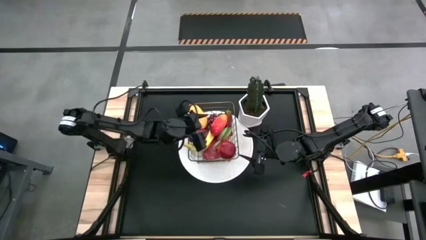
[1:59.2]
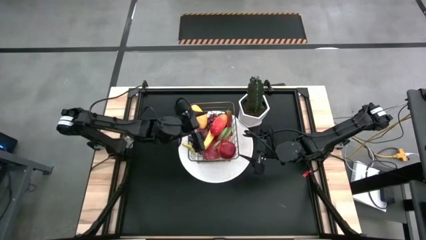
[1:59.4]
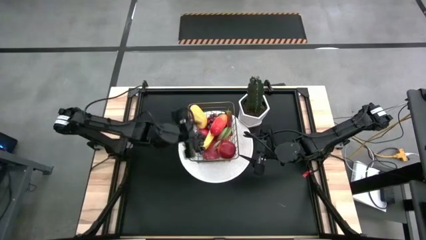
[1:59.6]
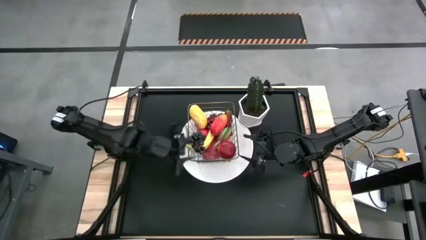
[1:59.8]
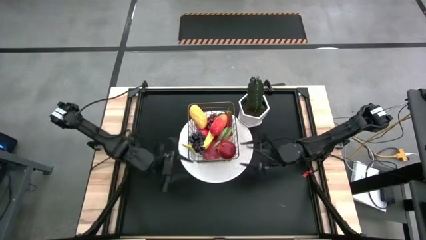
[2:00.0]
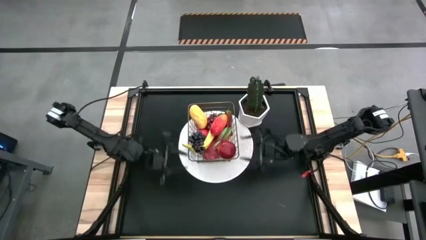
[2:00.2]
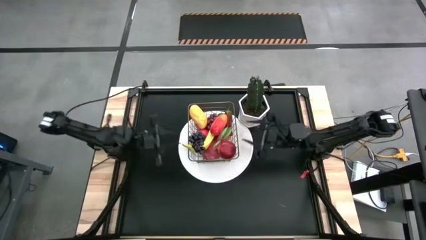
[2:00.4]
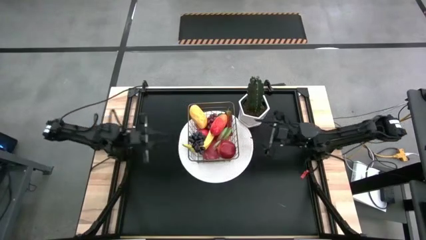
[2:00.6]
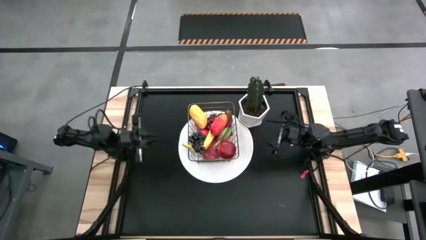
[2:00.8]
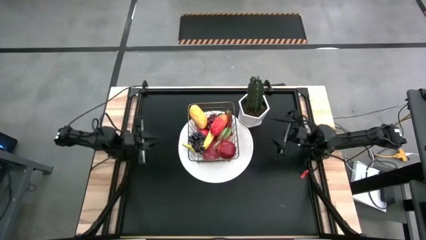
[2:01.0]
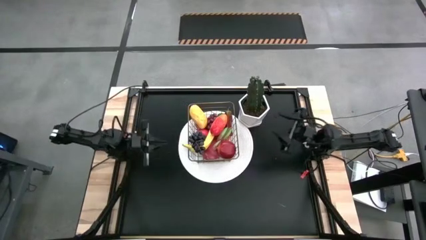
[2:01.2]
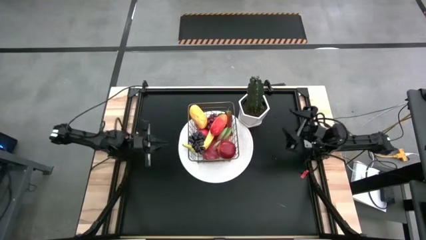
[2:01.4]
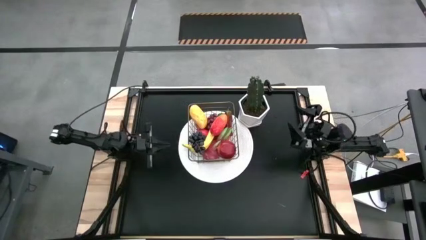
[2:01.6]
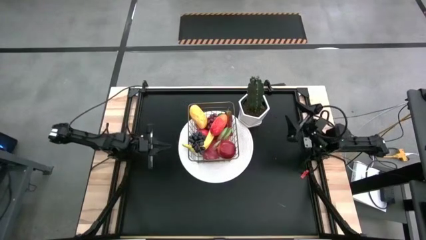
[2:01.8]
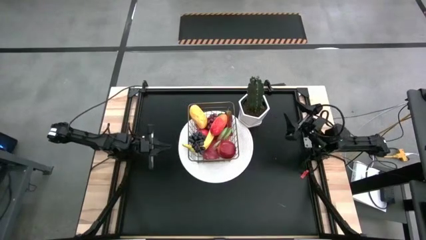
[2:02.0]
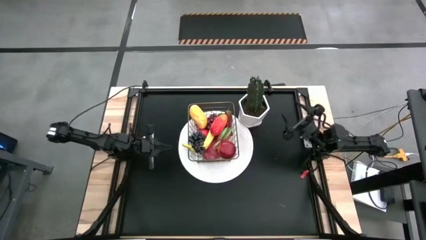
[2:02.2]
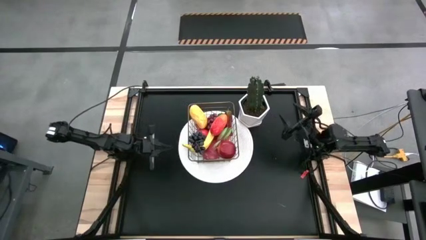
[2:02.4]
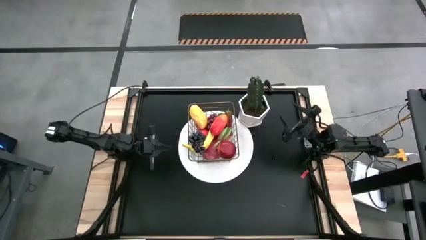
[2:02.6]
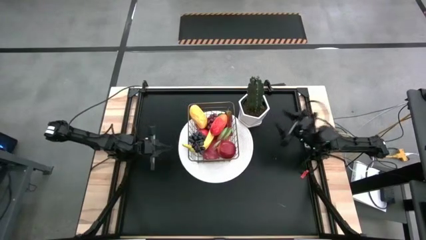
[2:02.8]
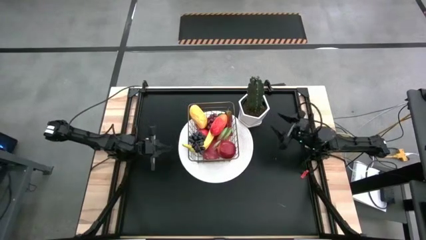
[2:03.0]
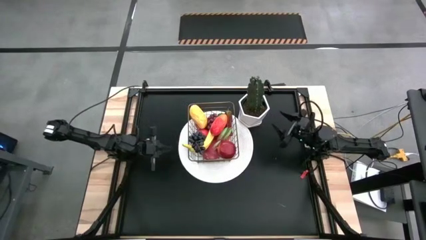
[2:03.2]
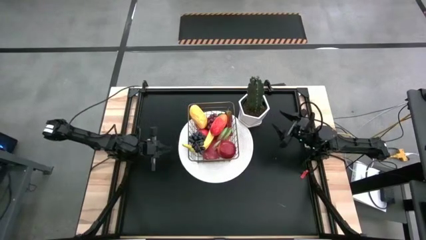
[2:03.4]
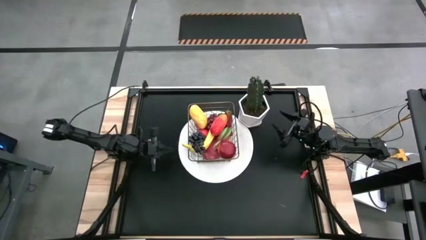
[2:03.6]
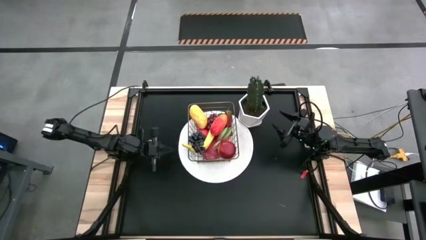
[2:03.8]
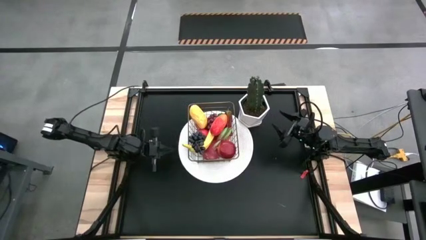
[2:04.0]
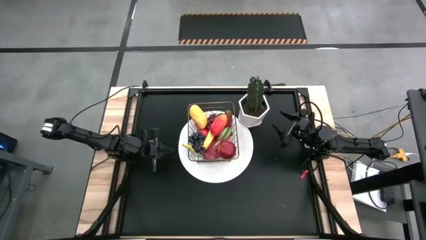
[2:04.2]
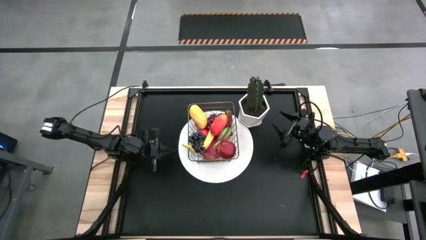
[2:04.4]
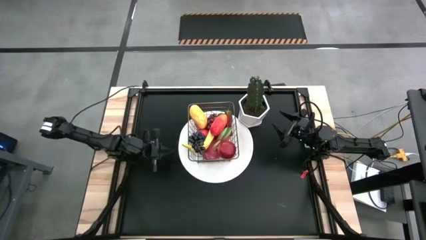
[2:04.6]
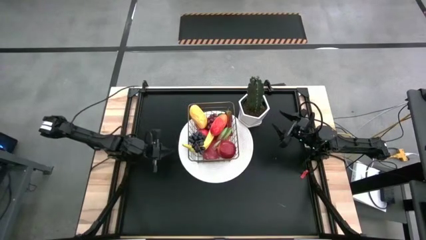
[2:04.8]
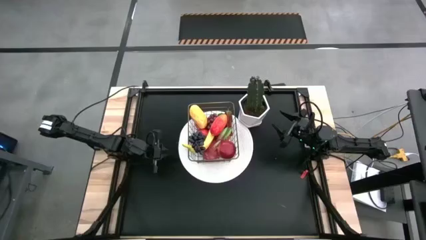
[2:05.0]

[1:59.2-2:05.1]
Task: Build produce basket
Return to Home Position

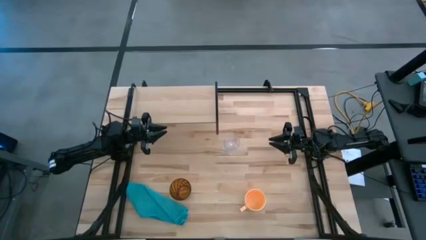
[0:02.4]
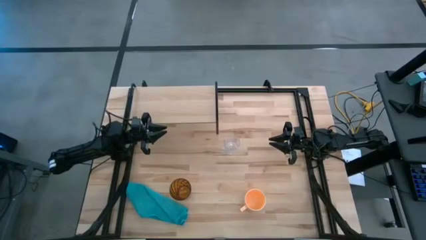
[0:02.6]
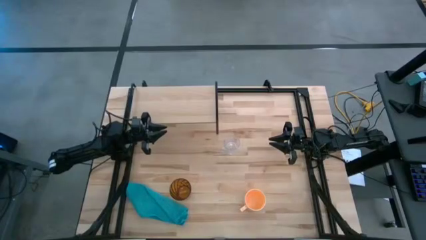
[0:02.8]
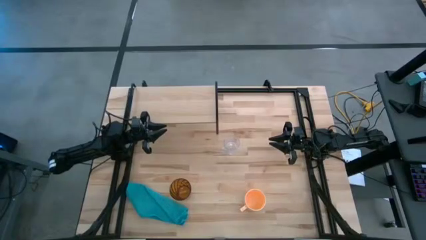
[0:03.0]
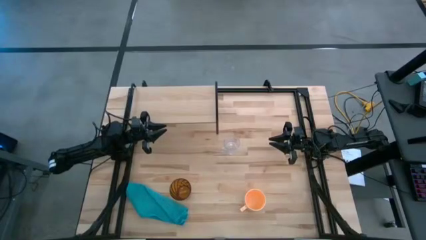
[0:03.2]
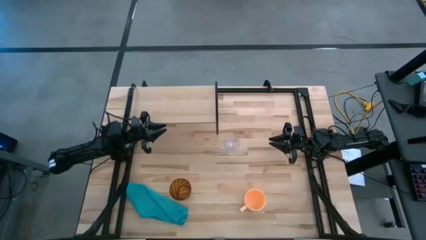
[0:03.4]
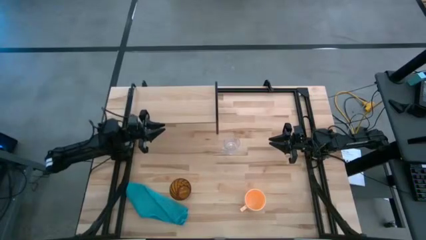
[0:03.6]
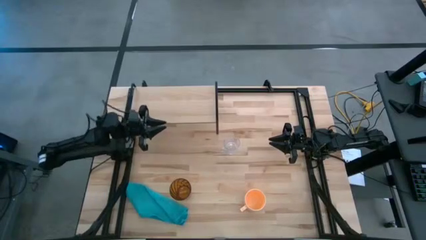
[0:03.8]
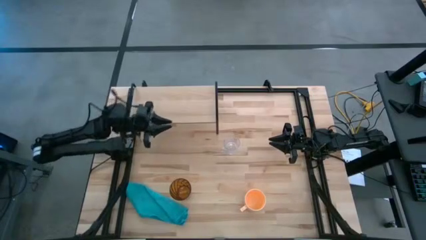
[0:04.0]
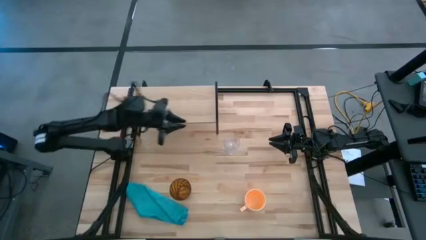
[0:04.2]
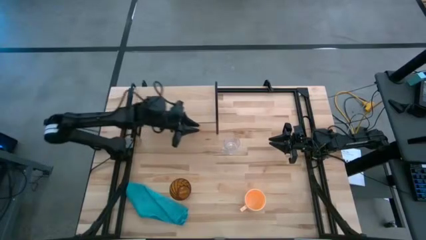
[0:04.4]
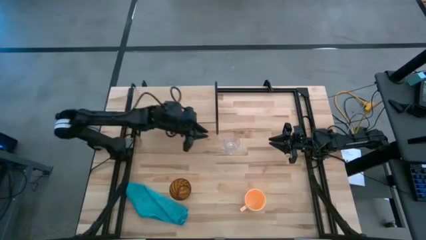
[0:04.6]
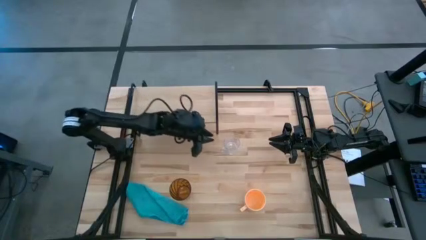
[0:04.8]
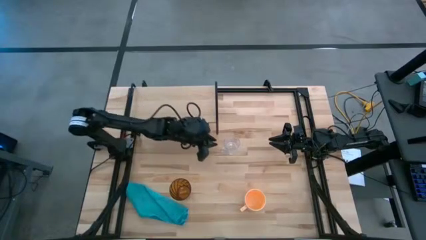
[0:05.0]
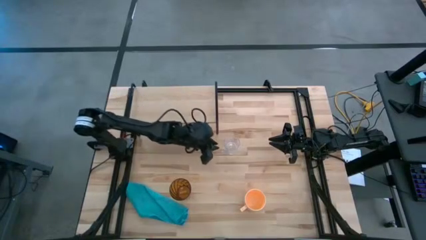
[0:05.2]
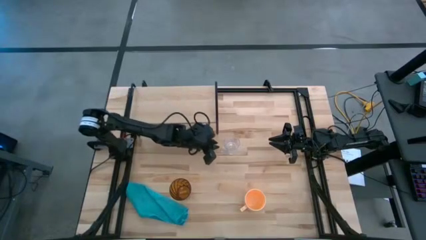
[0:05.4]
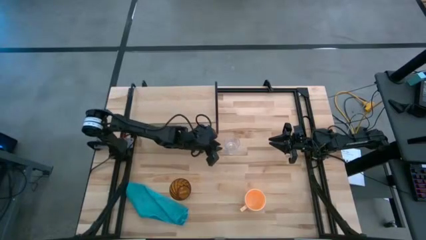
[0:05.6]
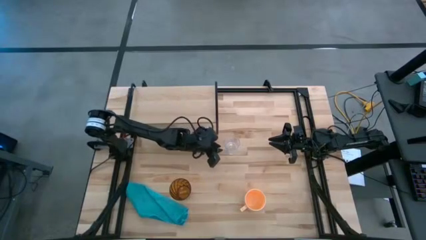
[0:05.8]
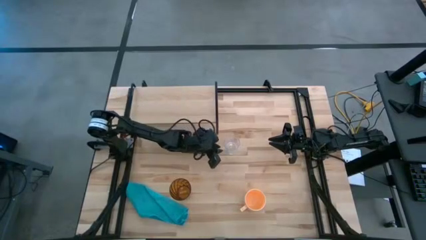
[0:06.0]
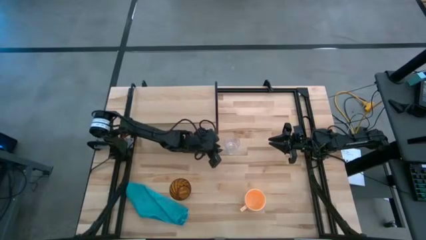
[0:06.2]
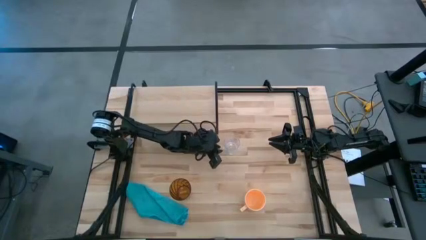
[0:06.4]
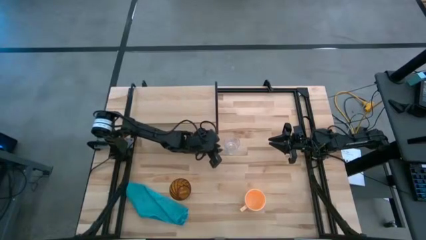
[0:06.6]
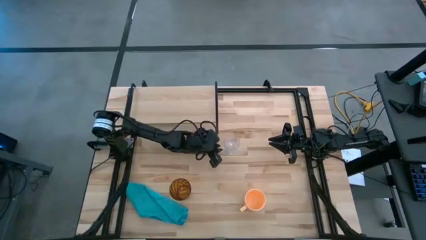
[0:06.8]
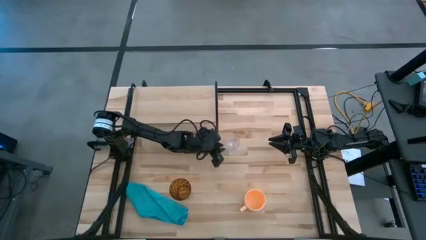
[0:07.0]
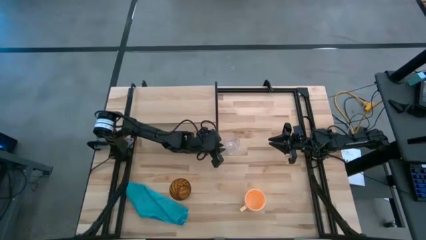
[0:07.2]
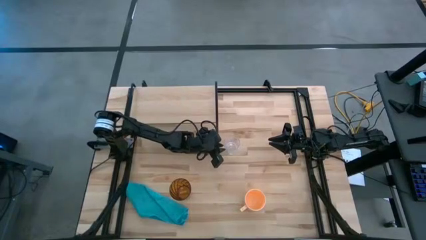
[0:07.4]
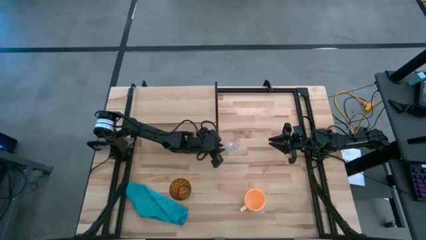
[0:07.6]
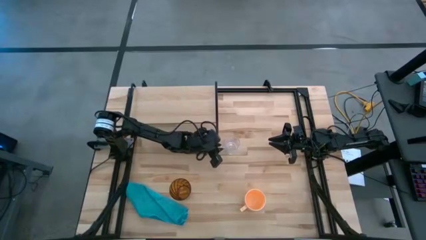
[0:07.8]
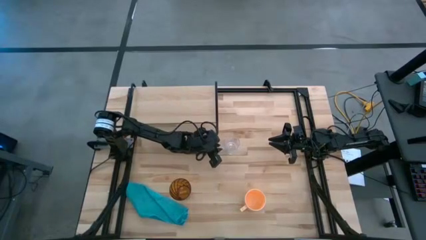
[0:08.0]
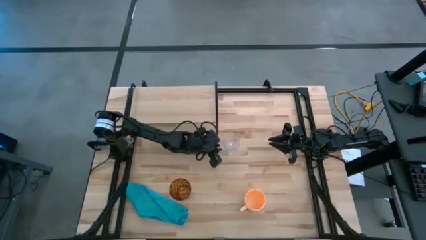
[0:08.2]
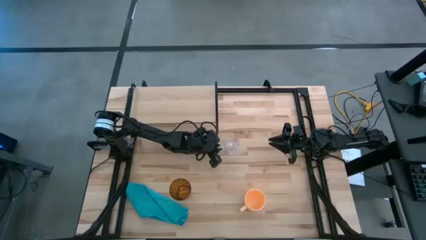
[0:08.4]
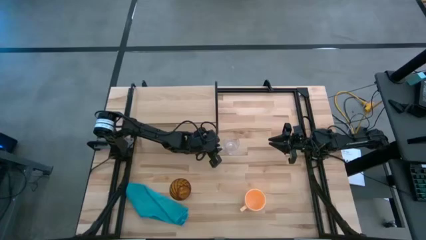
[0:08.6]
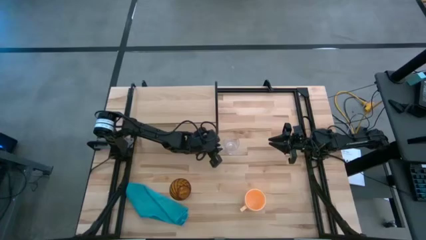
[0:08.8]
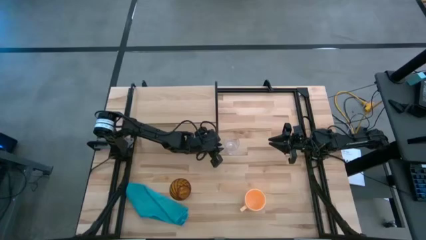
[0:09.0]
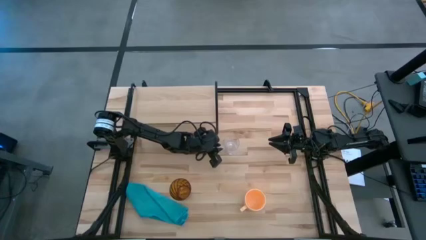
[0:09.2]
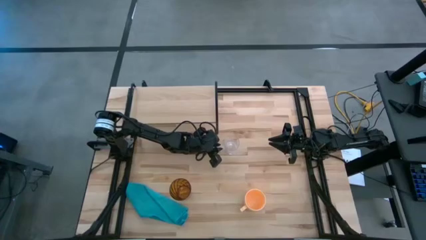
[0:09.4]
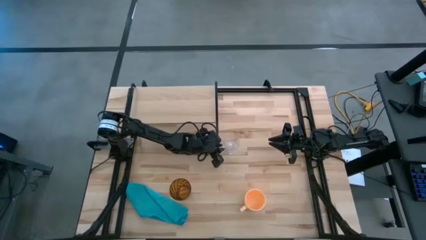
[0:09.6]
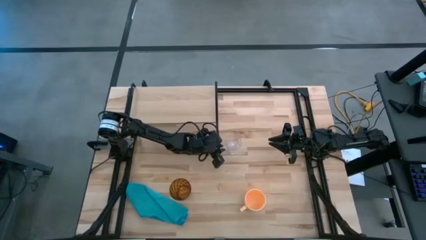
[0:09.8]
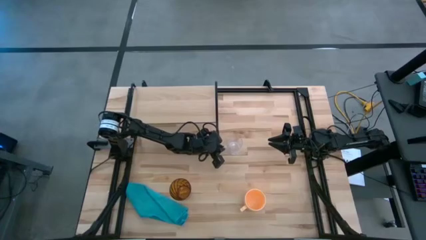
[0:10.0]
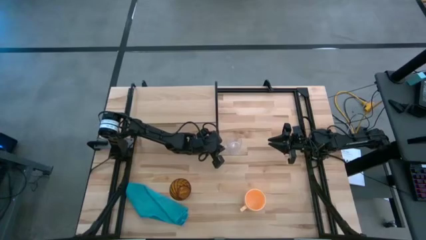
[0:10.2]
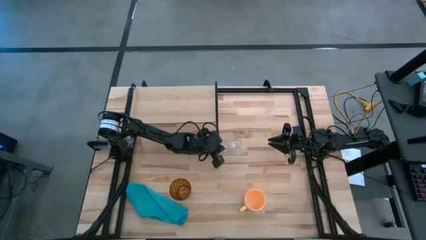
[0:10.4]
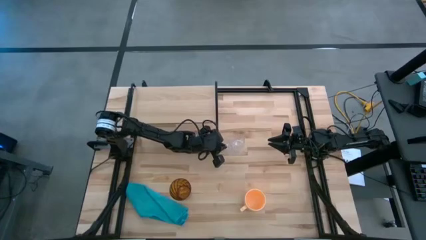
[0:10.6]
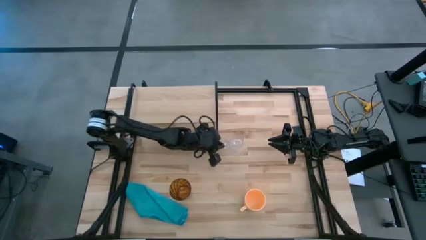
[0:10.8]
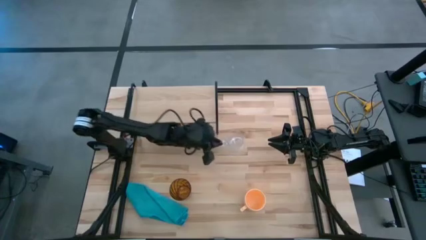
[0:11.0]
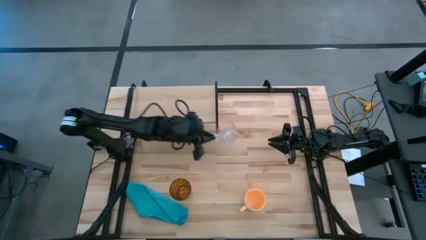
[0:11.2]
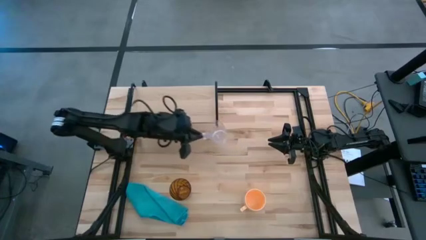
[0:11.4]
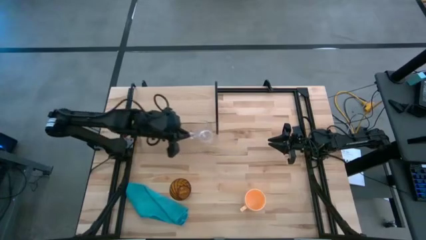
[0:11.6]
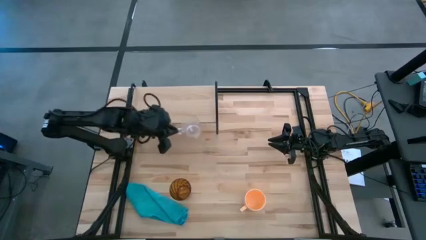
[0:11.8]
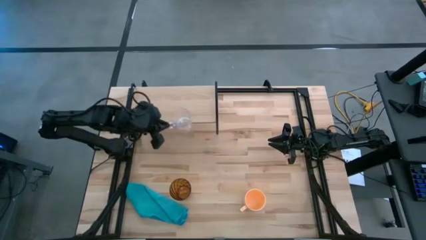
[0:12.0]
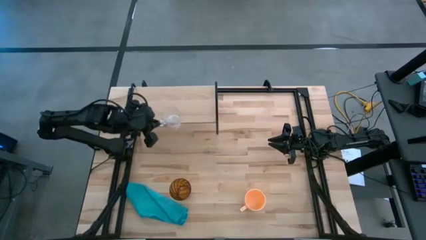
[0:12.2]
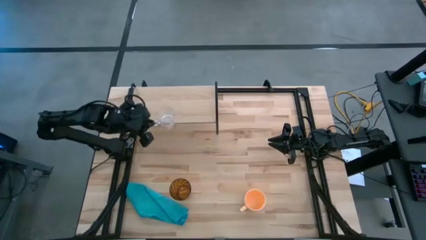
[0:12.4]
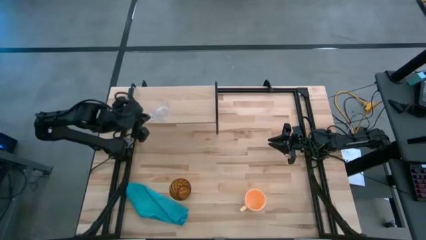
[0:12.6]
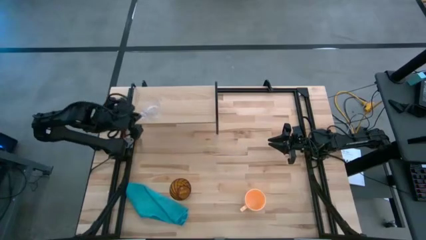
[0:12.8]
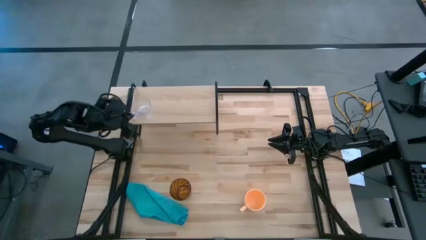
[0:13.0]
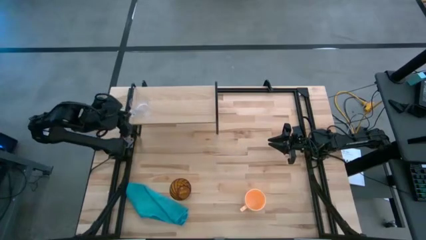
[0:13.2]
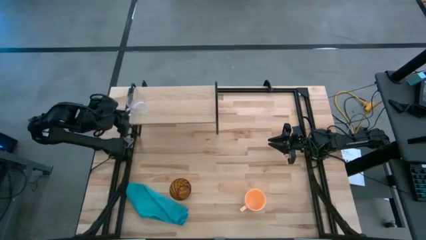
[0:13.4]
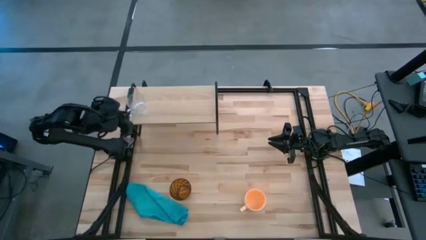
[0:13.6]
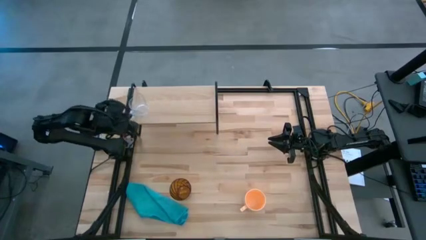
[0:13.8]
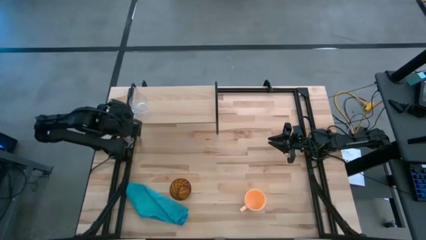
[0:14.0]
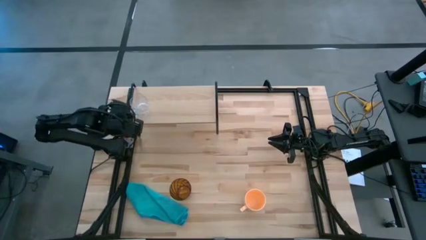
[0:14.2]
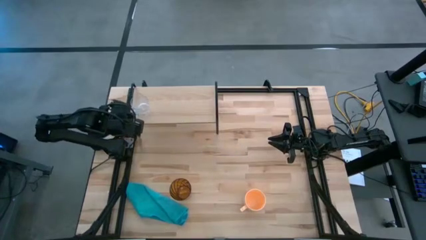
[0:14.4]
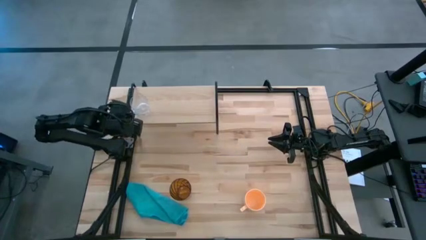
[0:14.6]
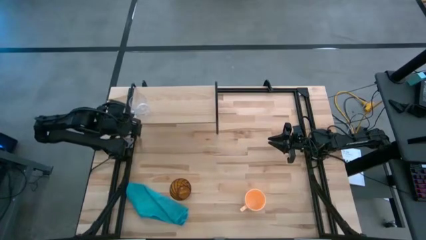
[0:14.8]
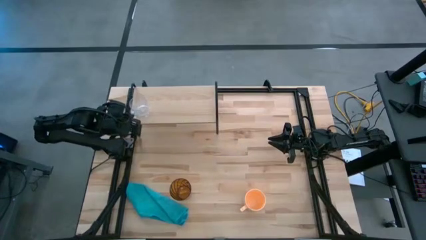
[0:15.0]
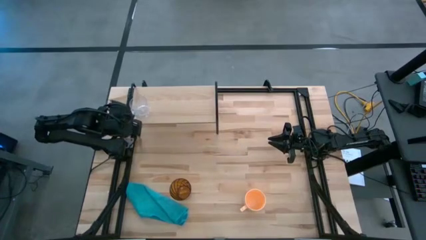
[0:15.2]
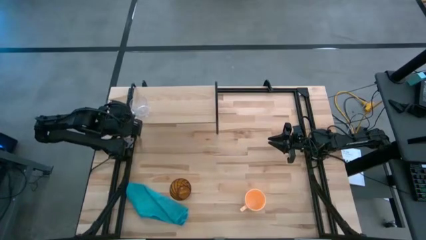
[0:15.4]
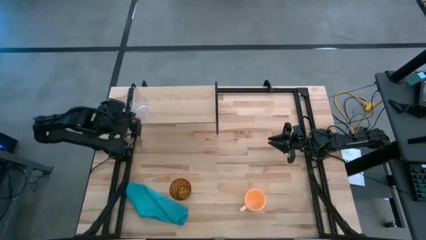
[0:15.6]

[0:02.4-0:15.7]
Task: Stack small to large cups/mugs on shelf
Put the transparent mug on the shelf
